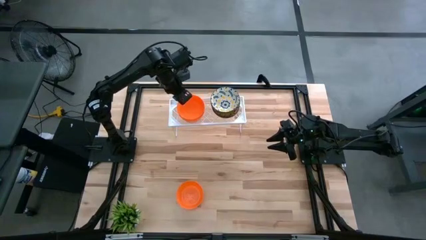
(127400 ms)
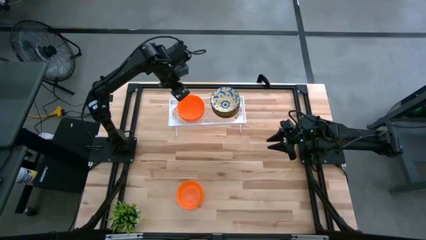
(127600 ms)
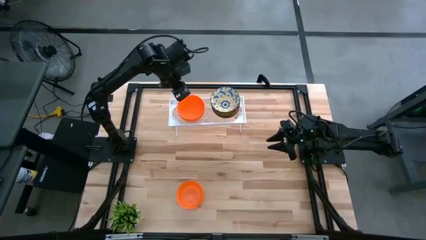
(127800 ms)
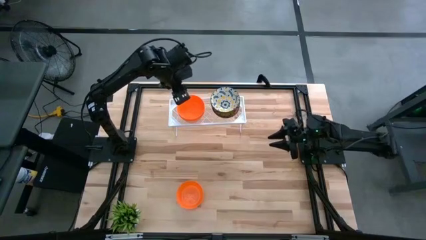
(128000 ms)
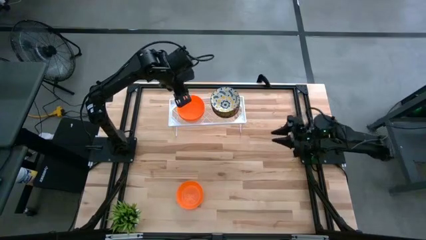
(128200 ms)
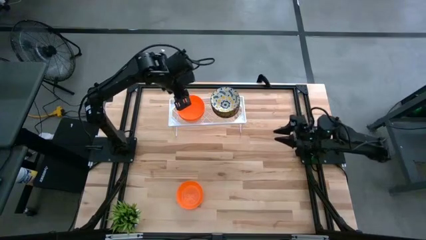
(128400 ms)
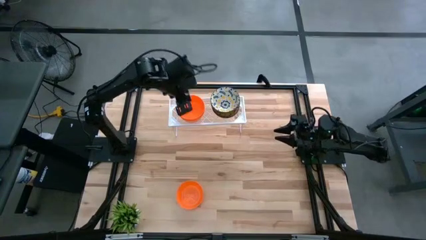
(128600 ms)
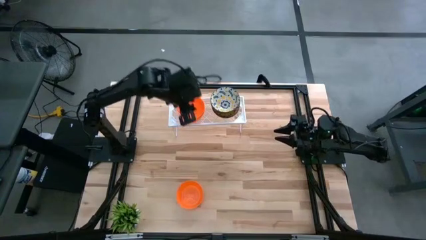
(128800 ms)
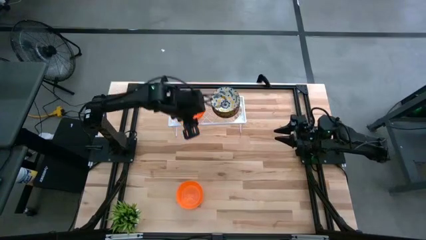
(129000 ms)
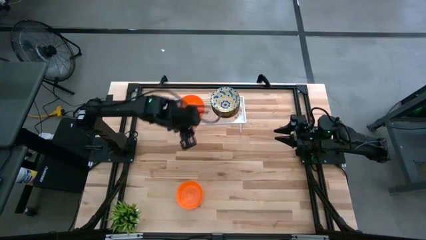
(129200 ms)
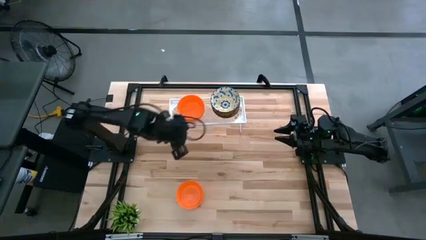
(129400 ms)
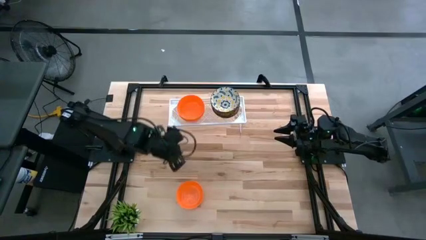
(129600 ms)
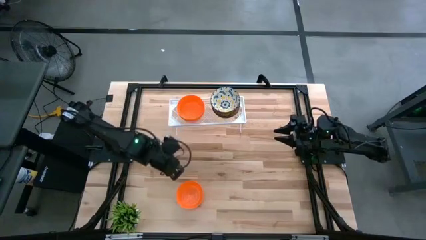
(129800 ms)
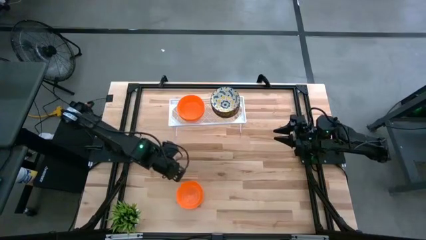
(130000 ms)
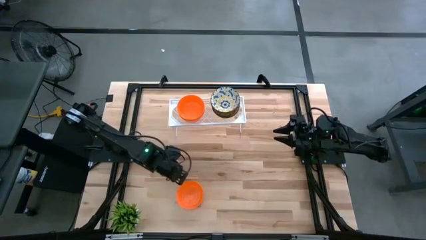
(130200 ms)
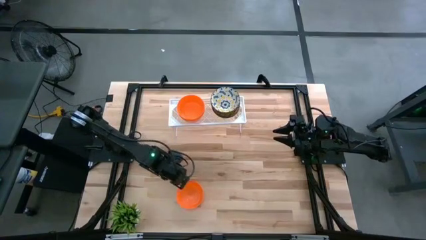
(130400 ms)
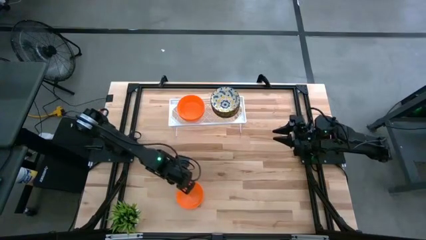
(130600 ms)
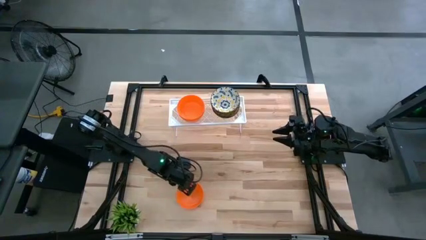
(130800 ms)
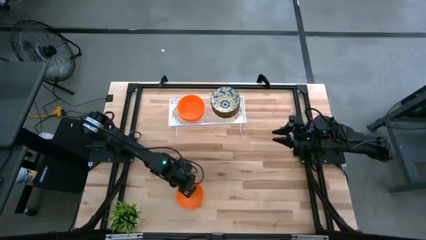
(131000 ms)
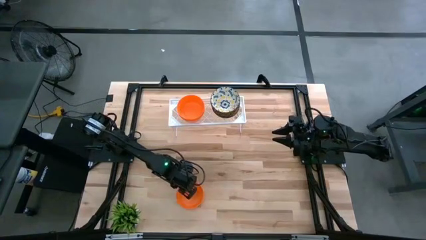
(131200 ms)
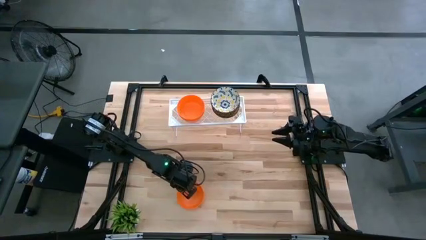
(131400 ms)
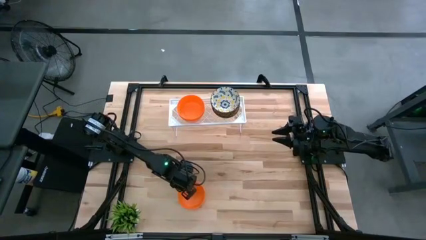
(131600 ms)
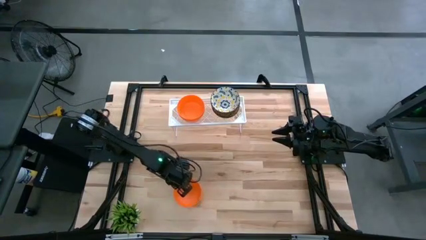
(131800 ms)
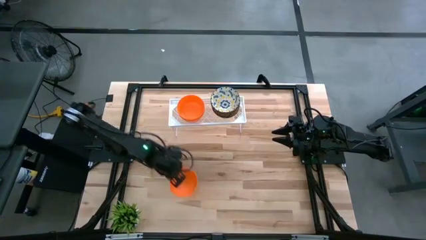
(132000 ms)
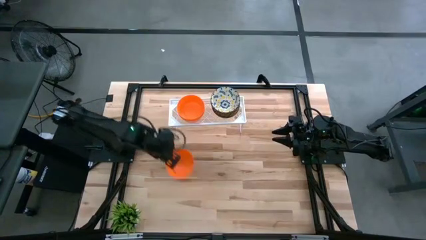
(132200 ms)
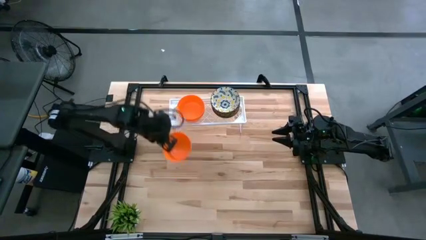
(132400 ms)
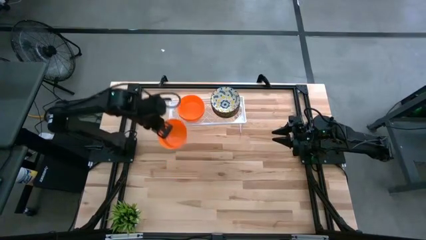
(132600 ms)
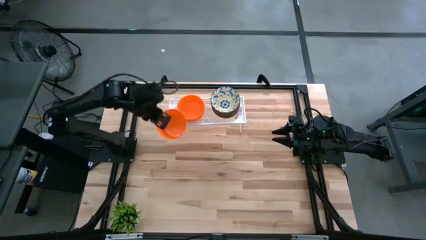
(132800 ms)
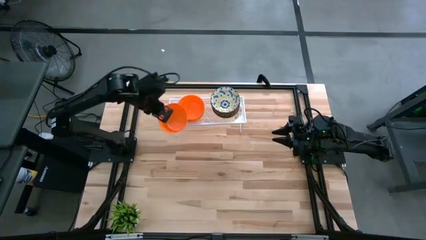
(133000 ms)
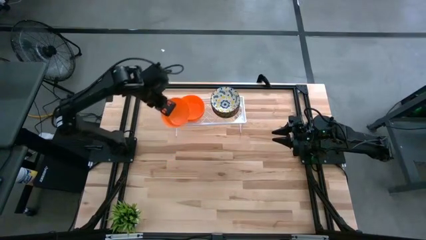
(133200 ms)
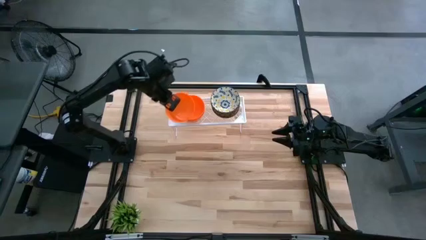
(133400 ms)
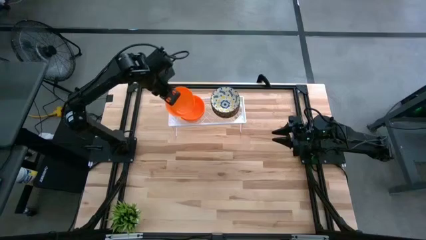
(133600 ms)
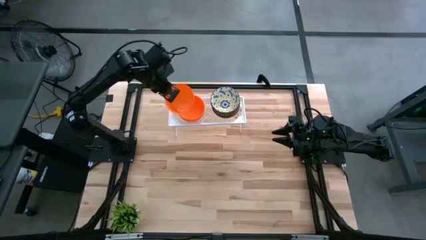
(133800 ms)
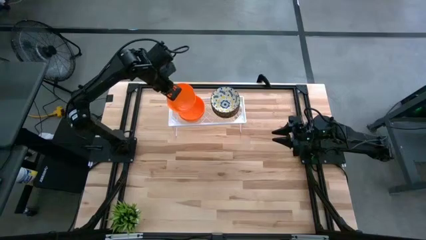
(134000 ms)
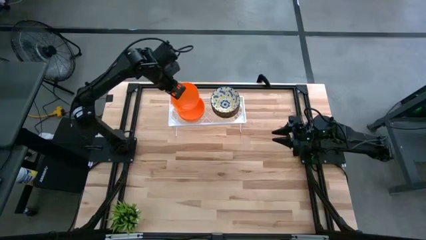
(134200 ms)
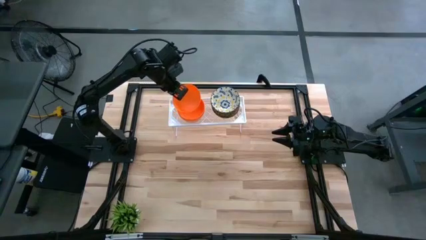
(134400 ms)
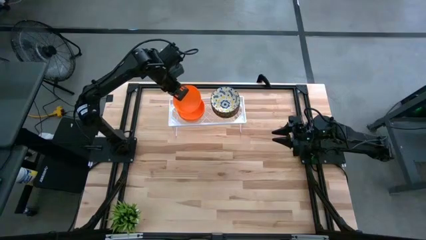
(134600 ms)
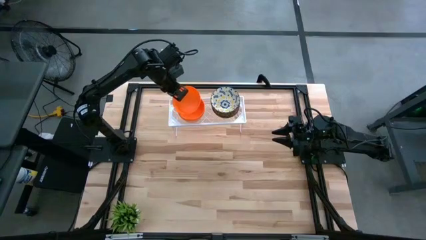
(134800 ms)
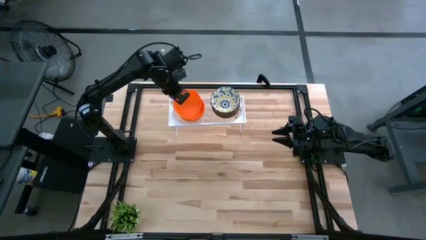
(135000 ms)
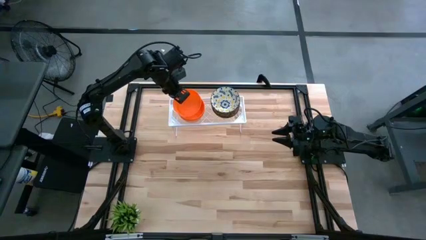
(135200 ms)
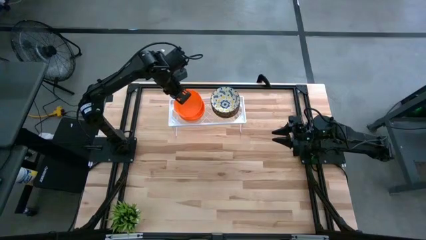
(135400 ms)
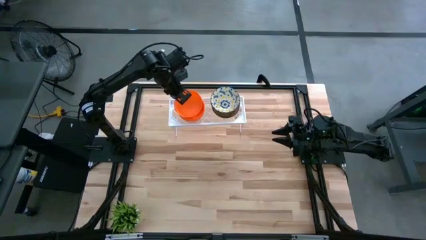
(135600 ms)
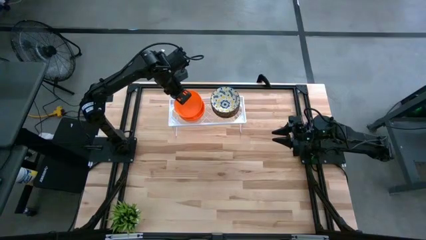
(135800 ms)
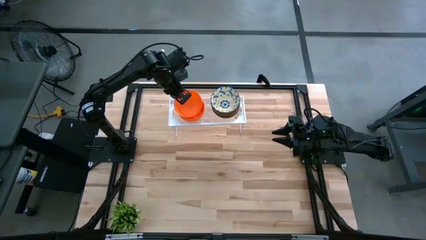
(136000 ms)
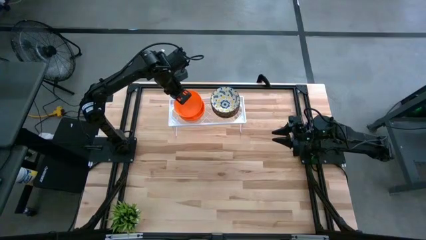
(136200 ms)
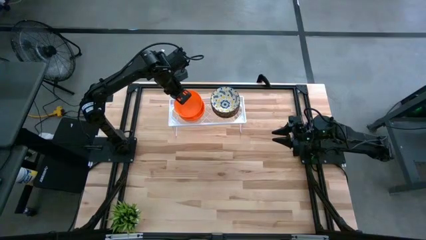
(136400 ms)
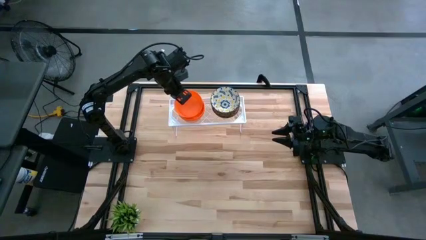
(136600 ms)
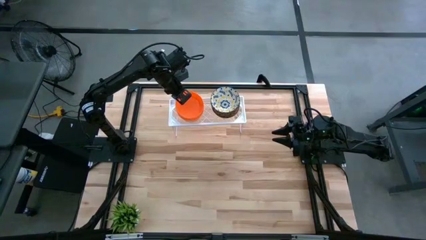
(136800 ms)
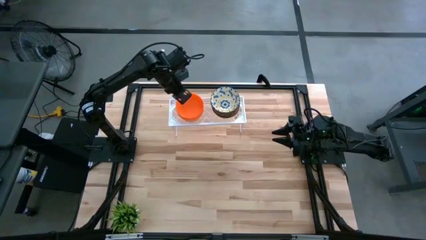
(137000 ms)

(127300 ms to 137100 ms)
Task: Pick & Place Mini bowls
Stack the orange bowl on the other orange bowls on the shelf

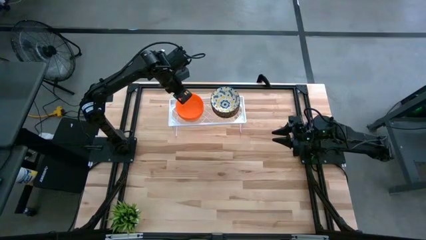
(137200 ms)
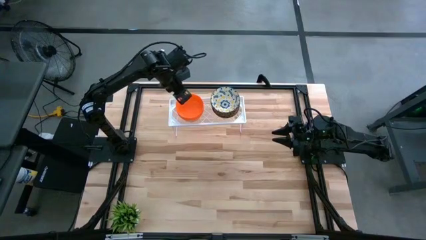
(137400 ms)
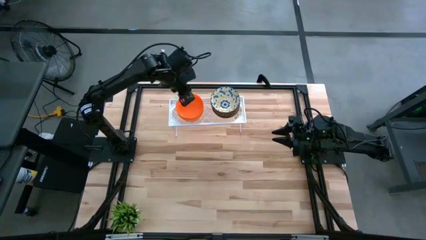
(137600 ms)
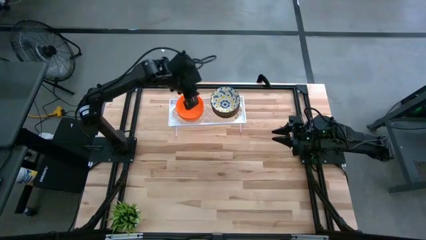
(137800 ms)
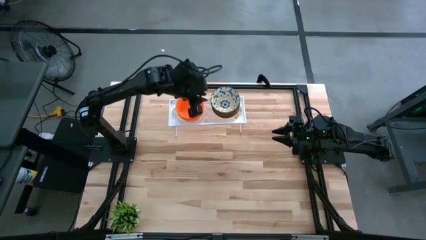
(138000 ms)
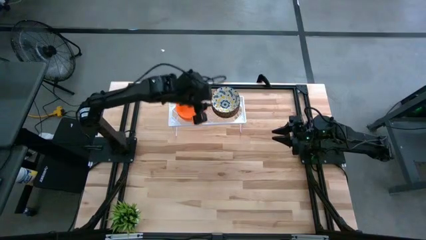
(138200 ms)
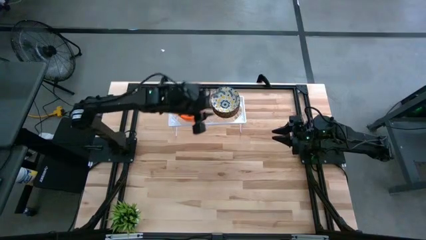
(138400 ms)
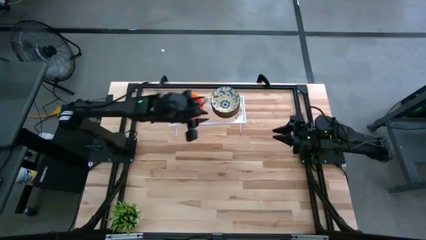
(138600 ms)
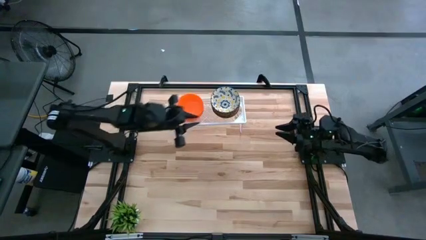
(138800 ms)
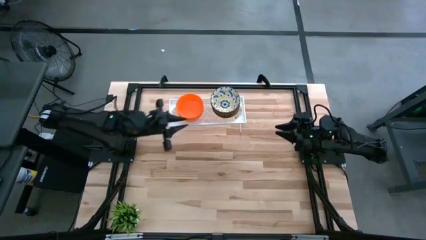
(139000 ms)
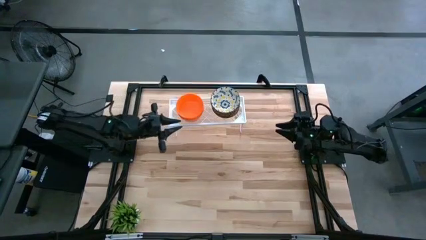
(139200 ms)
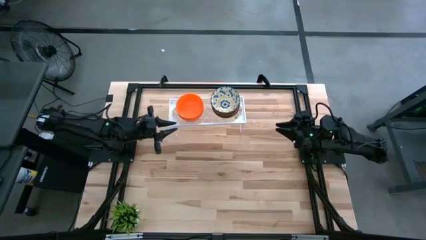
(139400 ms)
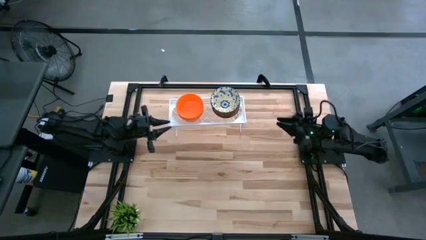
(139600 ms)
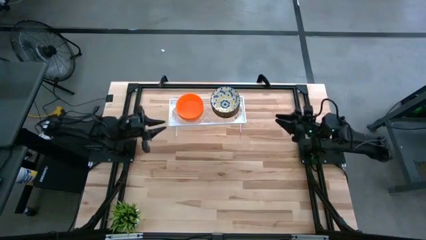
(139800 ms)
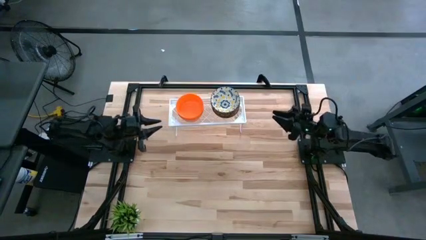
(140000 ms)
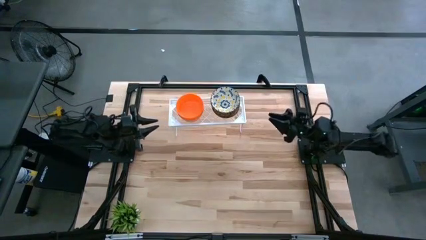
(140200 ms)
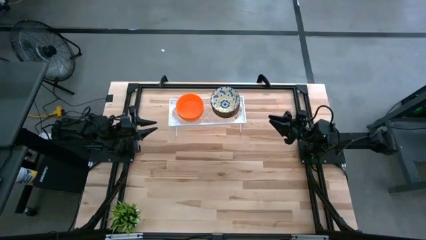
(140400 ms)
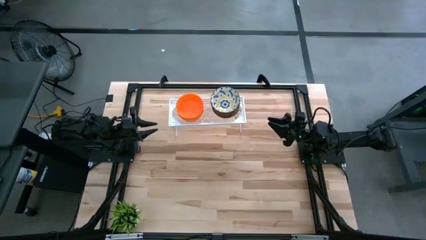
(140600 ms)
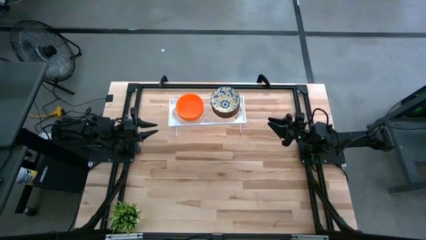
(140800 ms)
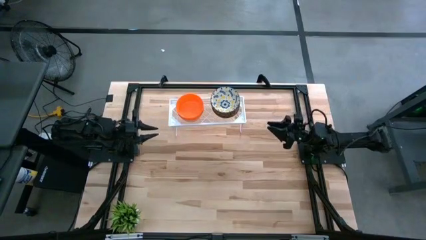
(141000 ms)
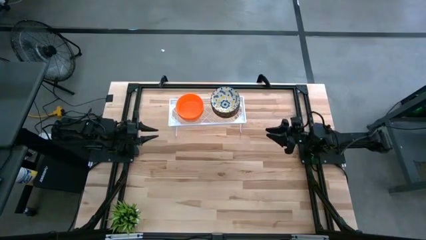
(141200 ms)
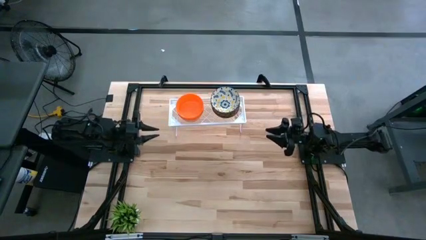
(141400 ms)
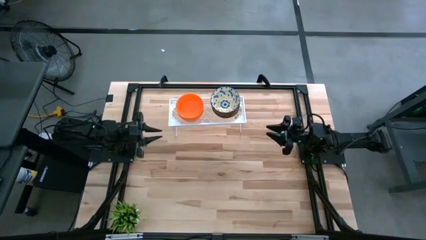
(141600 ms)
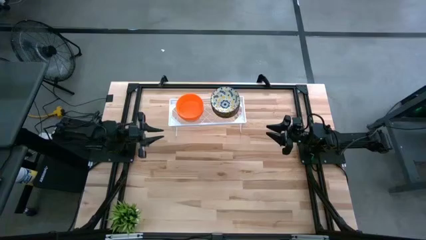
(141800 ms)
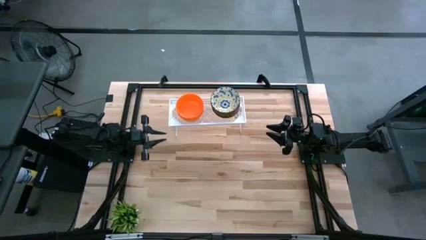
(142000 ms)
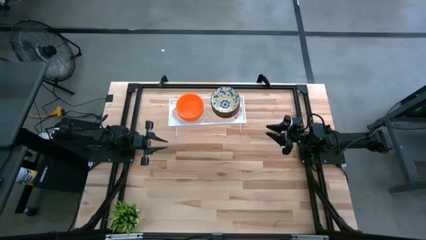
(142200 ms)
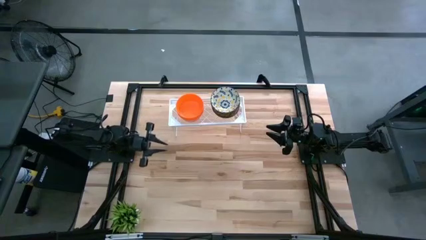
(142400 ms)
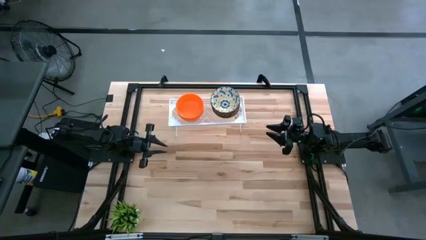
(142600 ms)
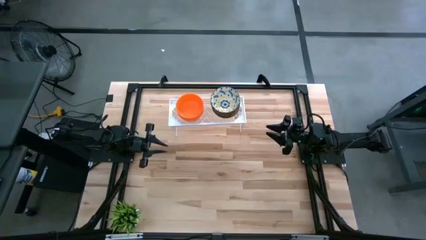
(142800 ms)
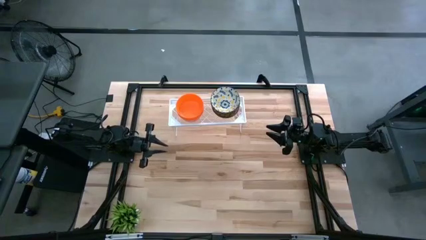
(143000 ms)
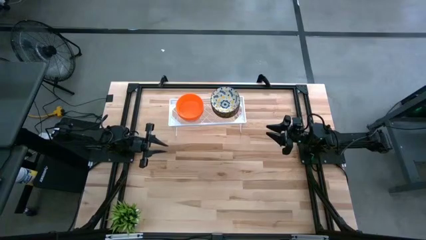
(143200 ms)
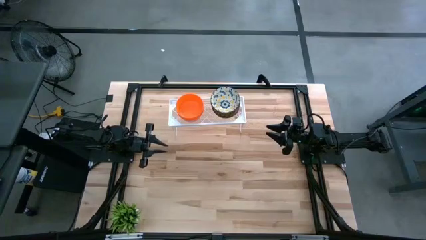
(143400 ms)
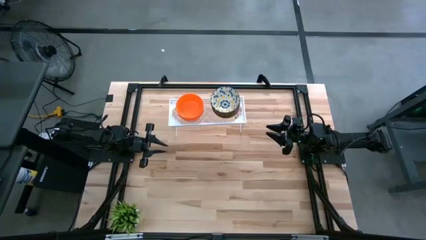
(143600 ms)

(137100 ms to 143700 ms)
Return to Home Position
